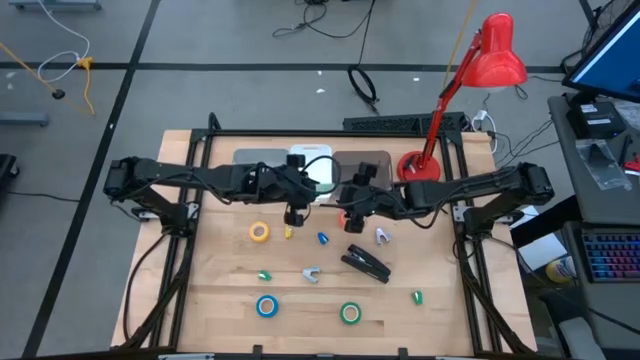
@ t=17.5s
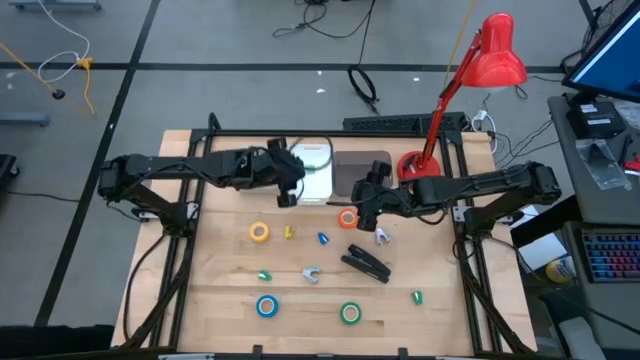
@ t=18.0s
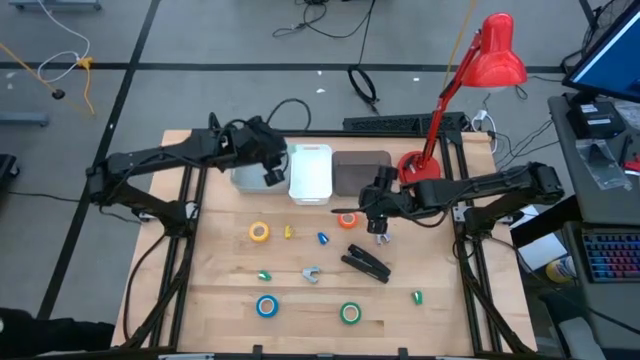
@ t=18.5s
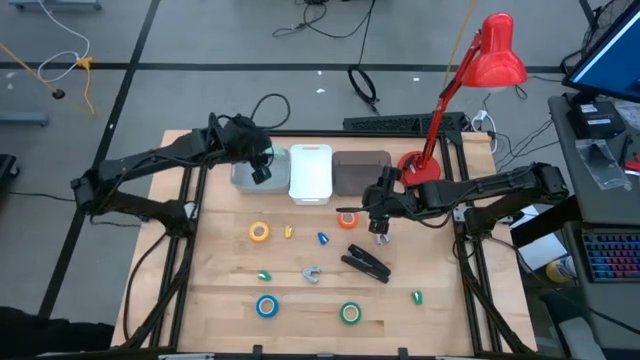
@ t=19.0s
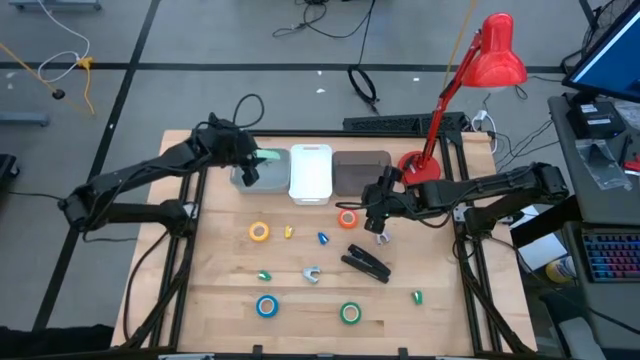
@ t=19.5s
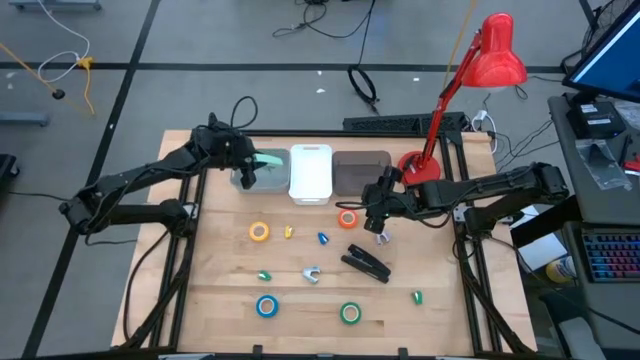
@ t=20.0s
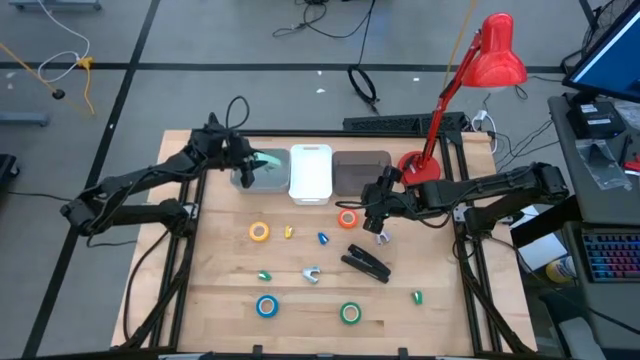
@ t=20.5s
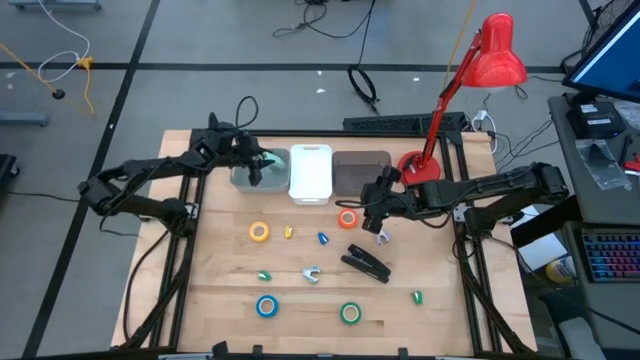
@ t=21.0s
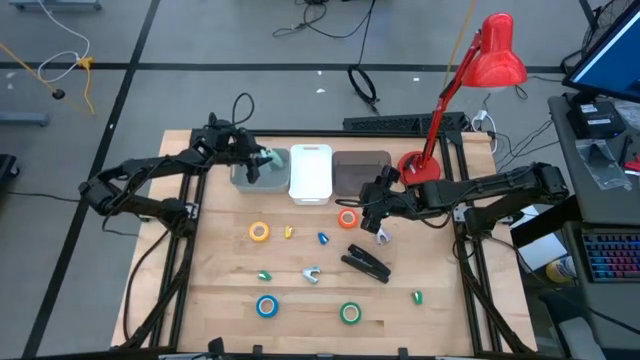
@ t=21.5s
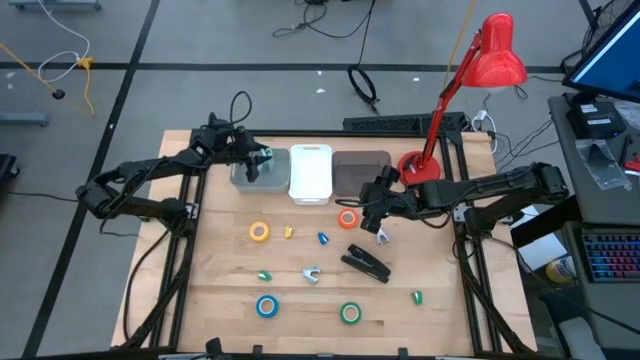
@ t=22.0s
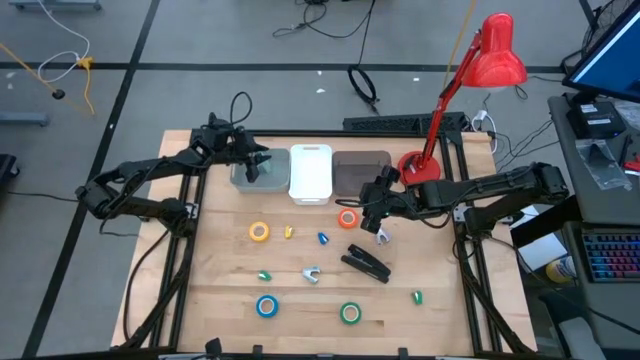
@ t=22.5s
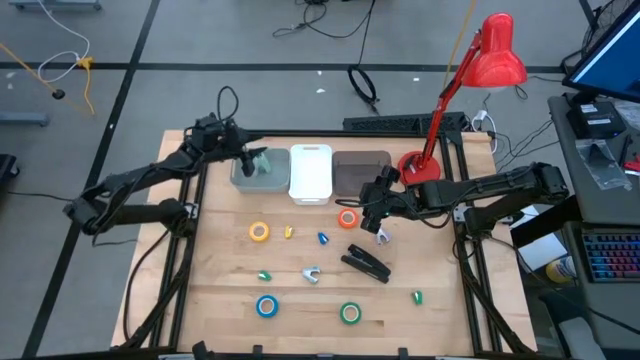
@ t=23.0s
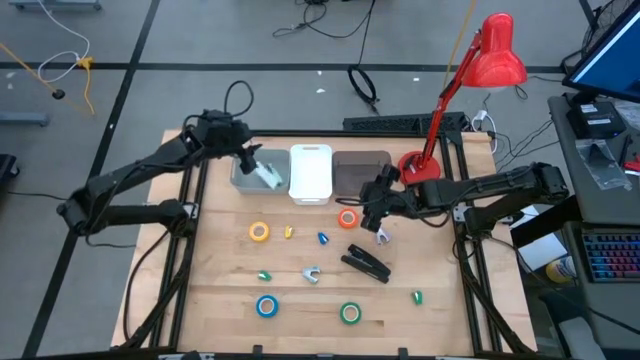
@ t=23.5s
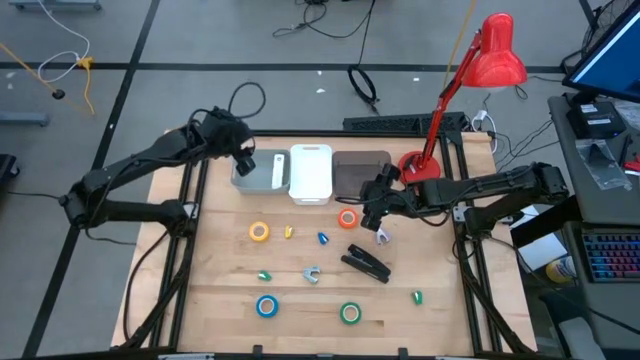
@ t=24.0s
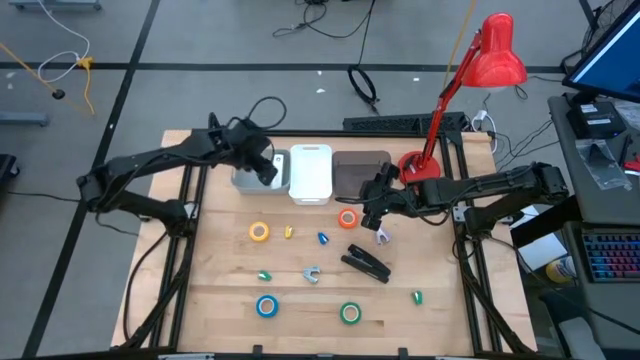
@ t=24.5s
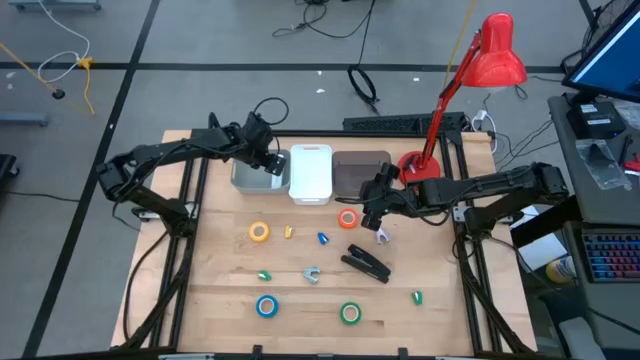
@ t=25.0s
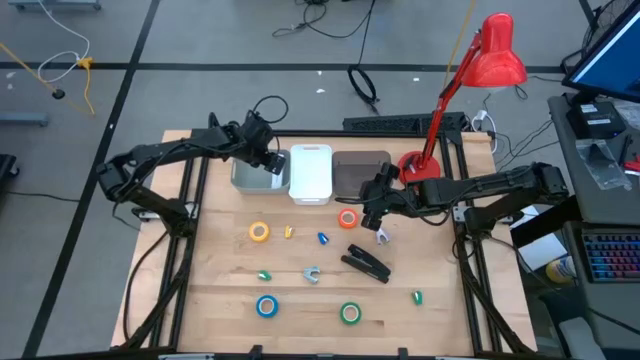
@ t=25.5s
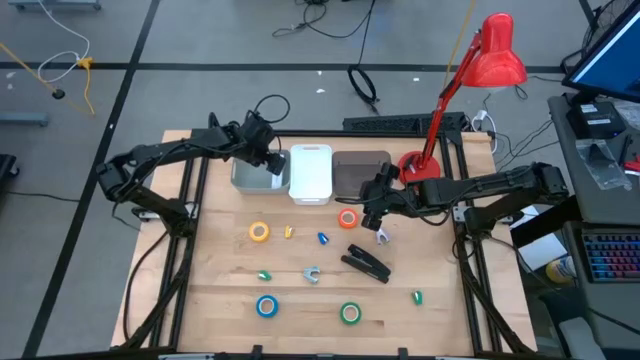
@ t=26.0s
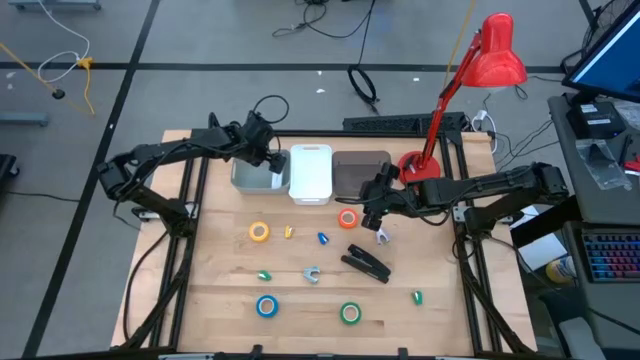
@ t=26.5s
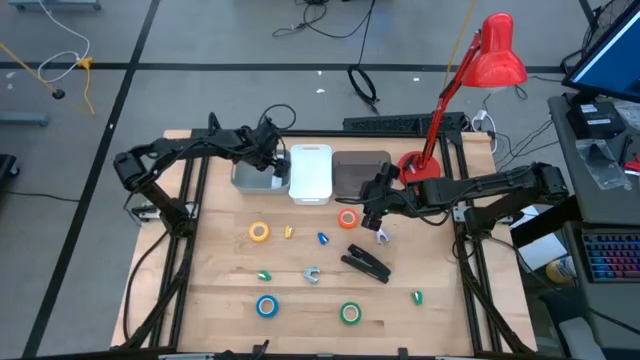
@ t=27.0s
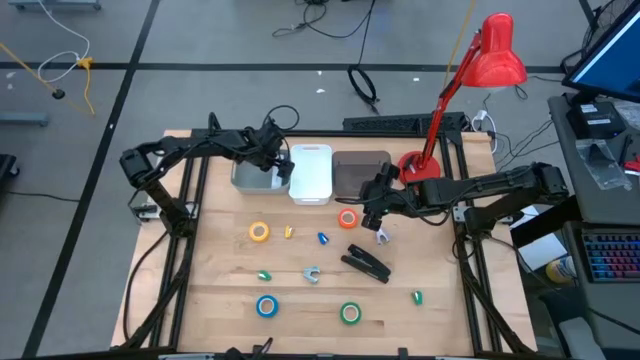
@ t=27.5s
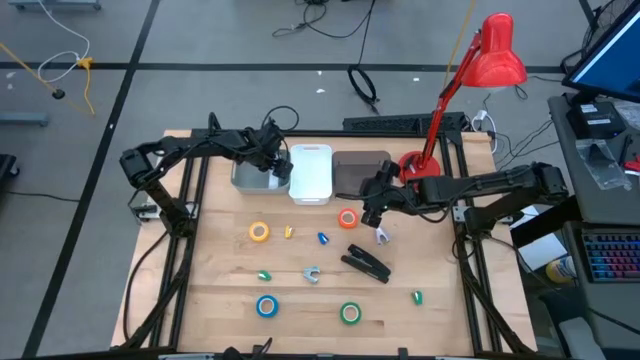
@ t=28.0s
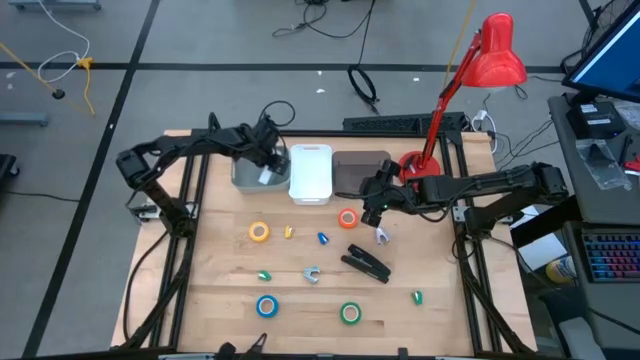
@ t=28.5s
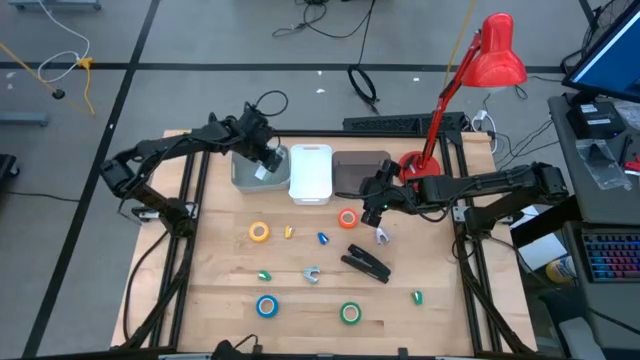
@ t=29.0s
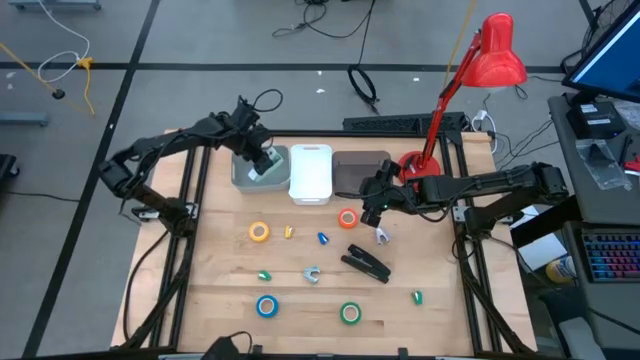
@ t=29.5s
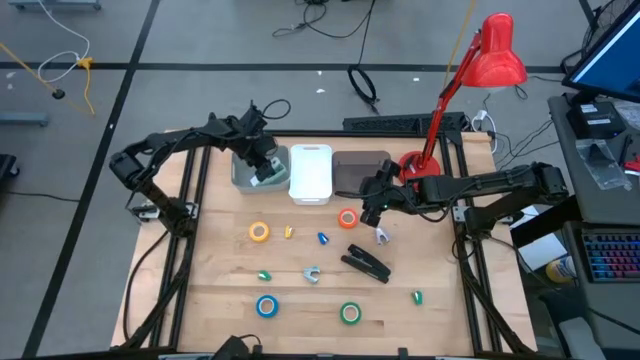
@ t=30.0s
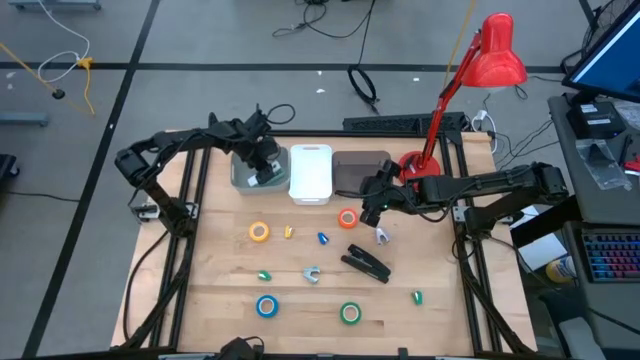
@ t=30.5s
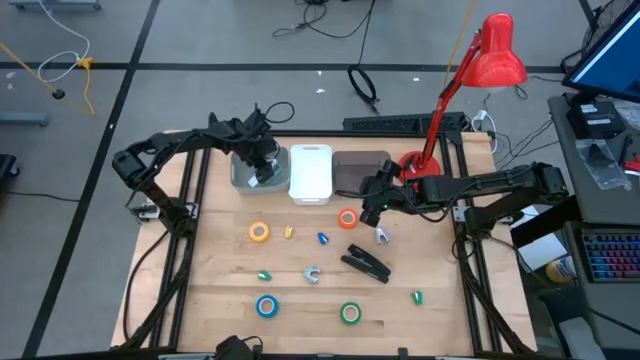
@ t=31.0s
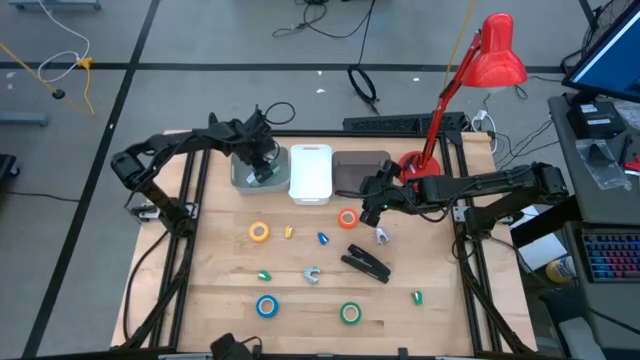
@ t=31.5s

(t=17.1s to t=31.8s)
Task: Pick and place Stapler, Stapler remover, tape
Put the light green stapler into the gray bin

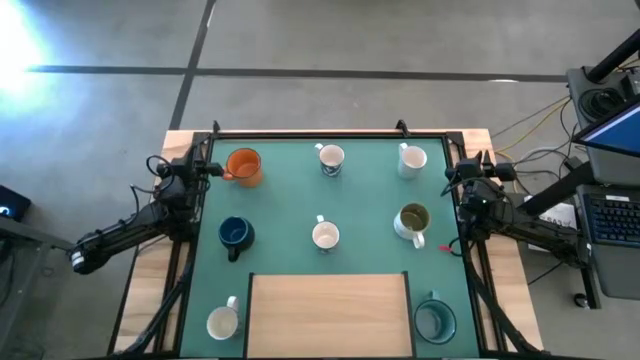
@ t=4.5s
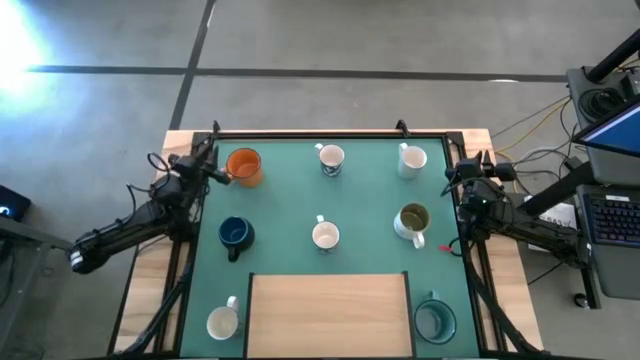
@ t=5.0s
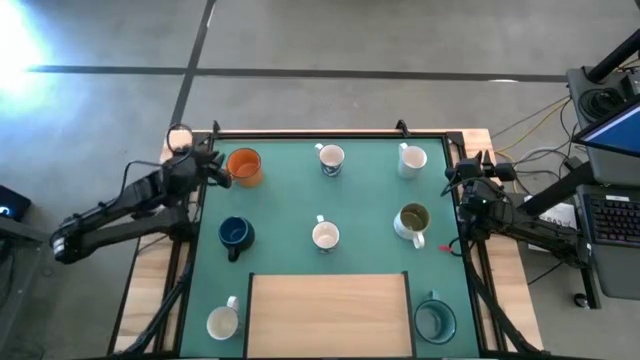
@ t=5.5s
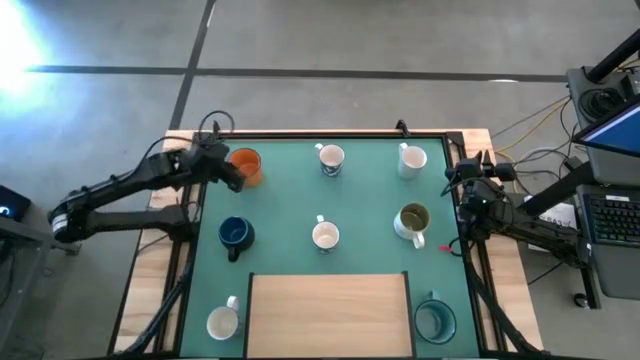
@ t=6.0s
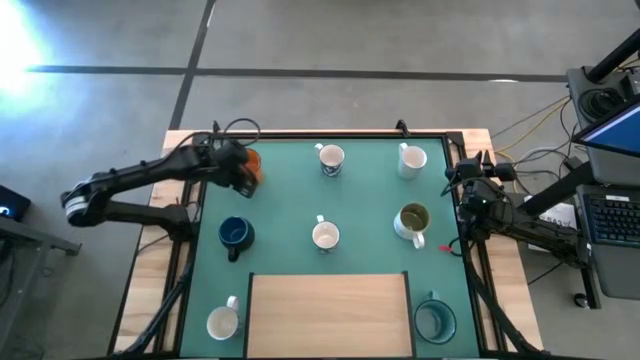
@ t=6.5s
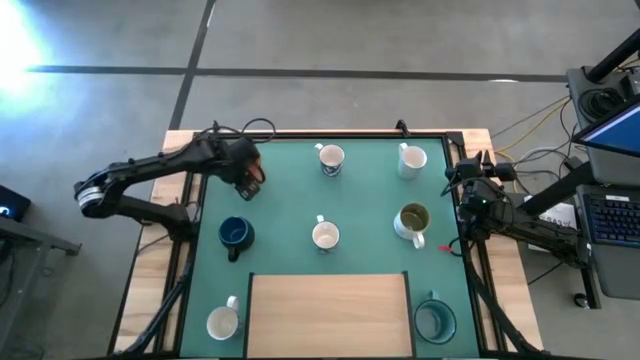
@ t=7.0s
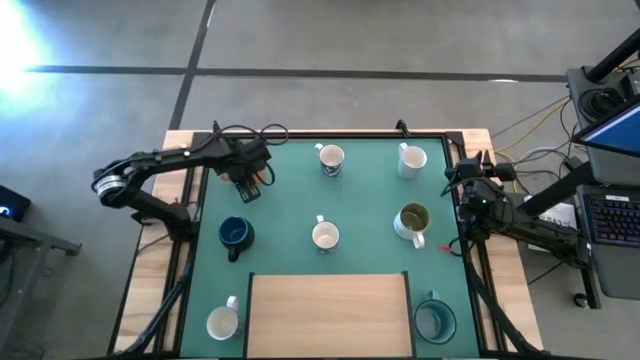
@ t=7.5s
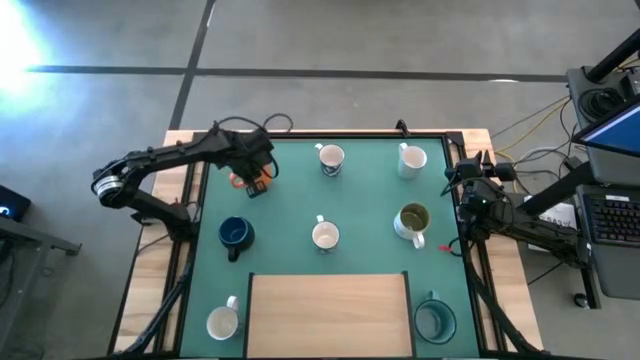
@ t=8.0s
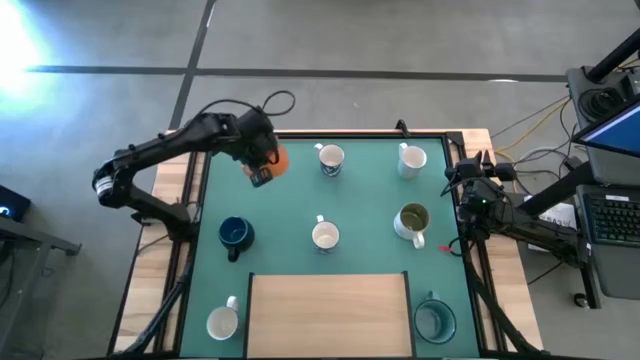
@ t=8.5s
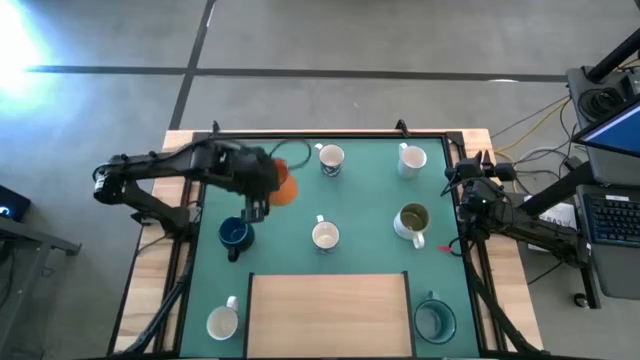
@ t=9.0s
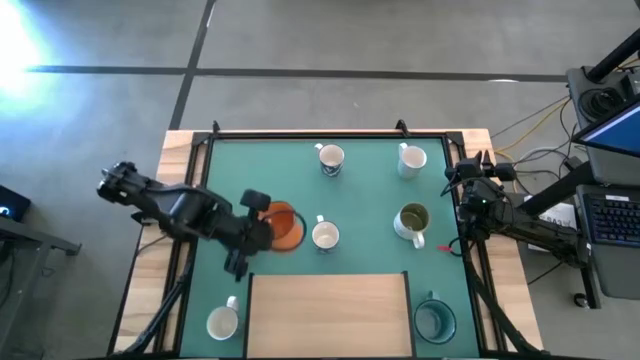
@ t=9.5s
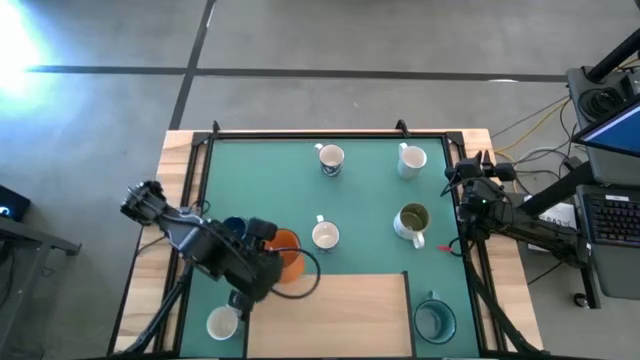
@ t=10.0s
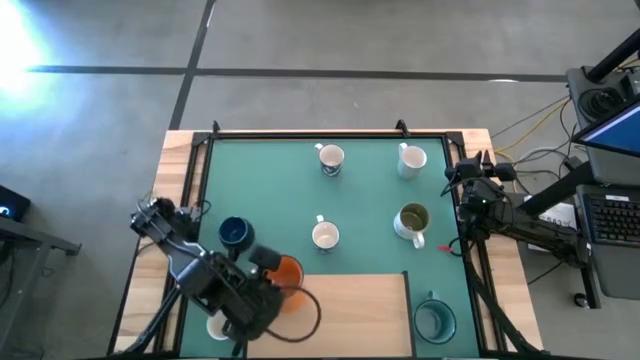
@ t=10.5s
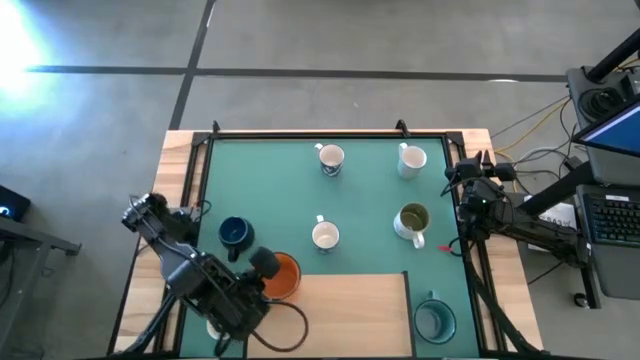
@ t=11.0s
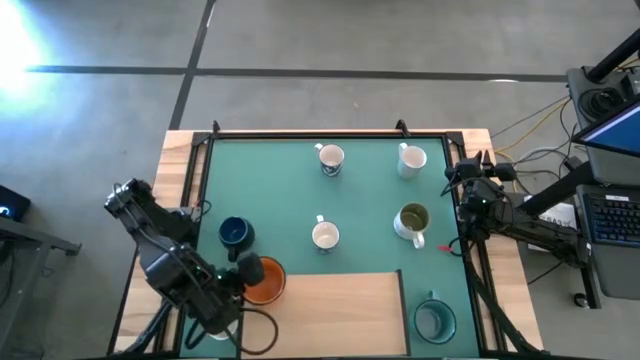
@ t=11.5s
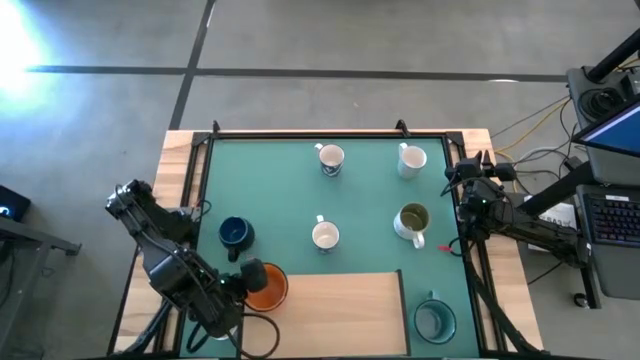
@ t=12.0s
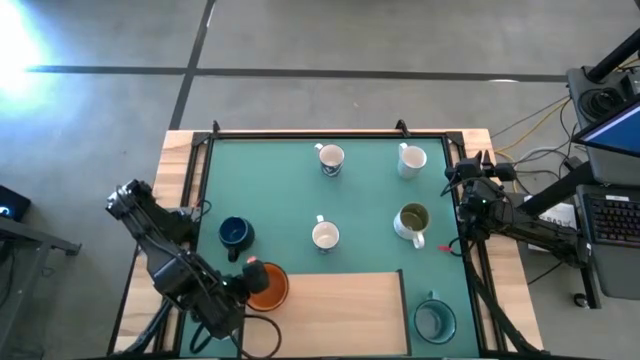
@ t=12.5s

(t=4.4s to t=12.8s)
Task: Place coffee mugs
Put the orange mug on the shelf
